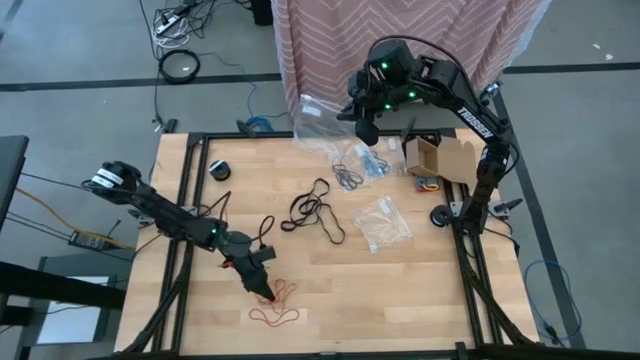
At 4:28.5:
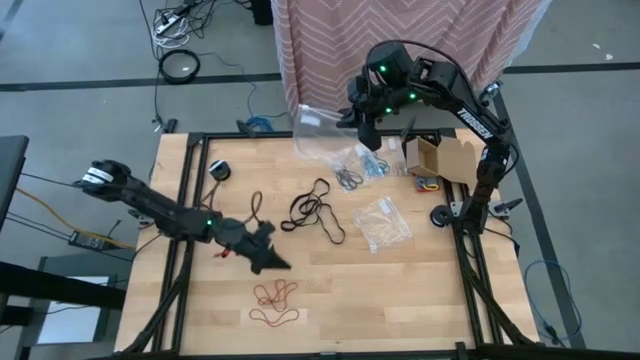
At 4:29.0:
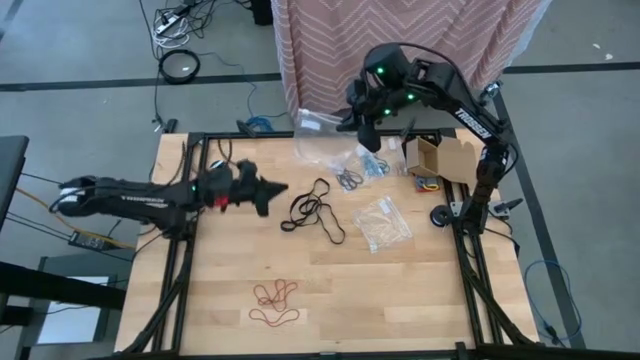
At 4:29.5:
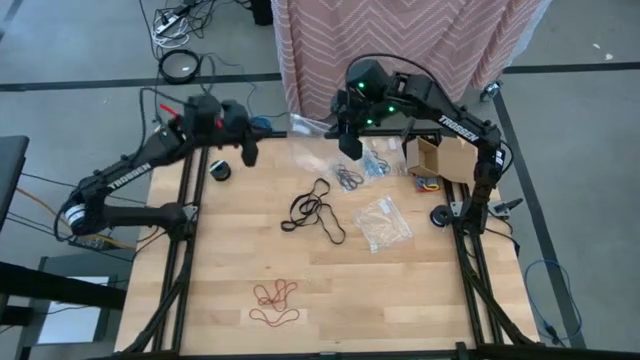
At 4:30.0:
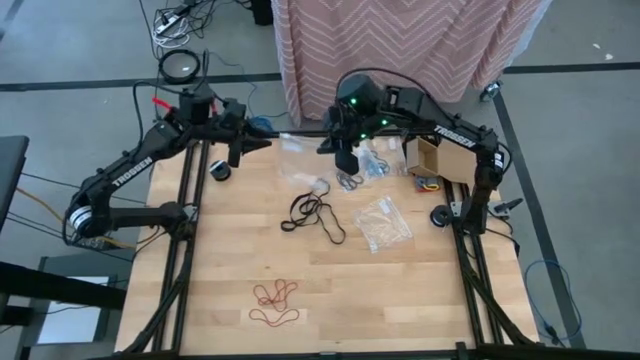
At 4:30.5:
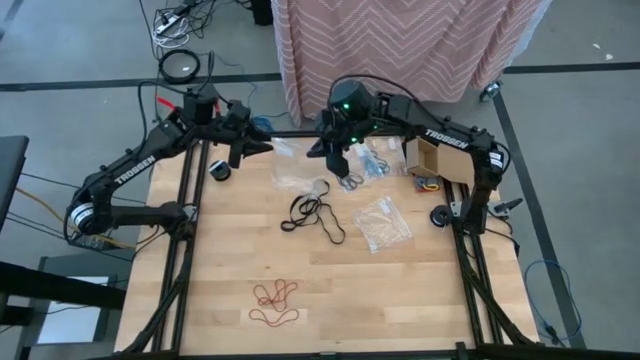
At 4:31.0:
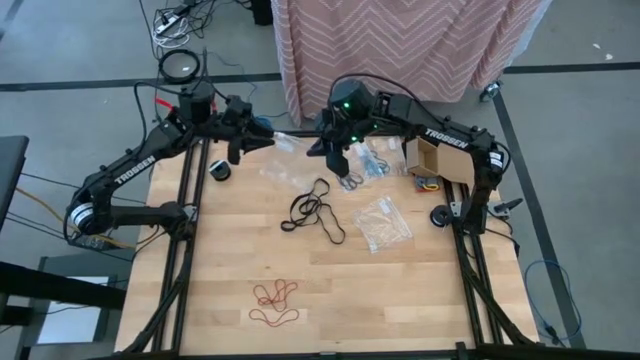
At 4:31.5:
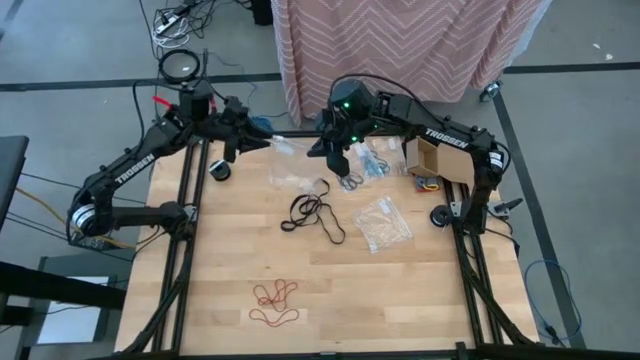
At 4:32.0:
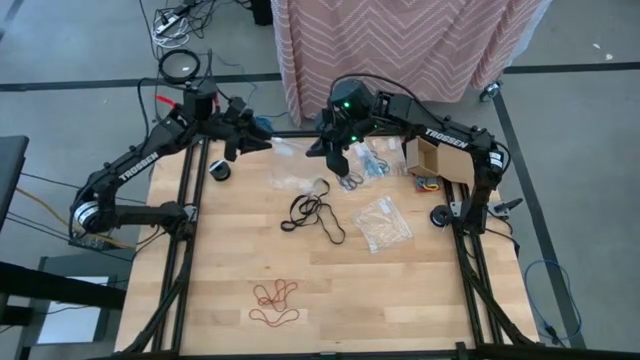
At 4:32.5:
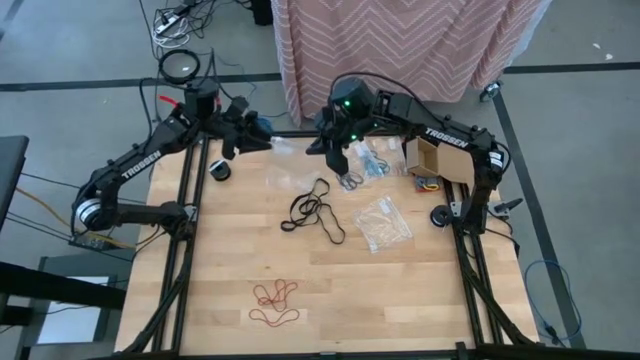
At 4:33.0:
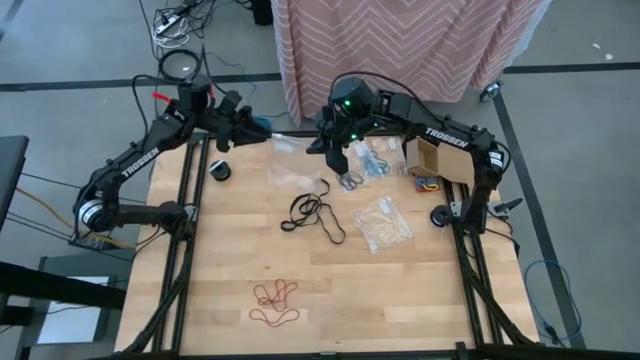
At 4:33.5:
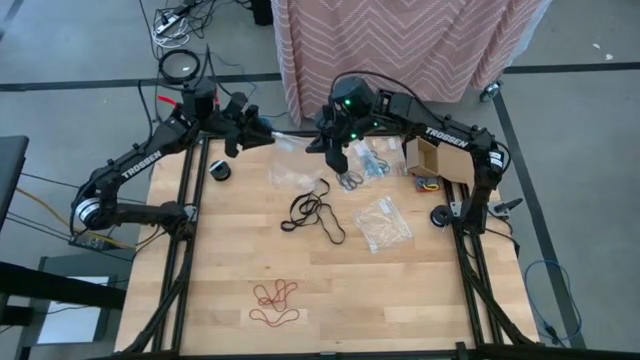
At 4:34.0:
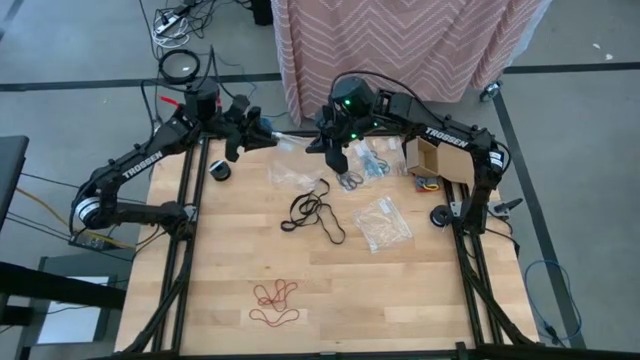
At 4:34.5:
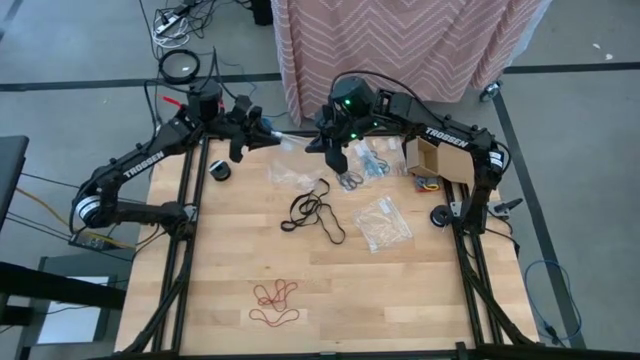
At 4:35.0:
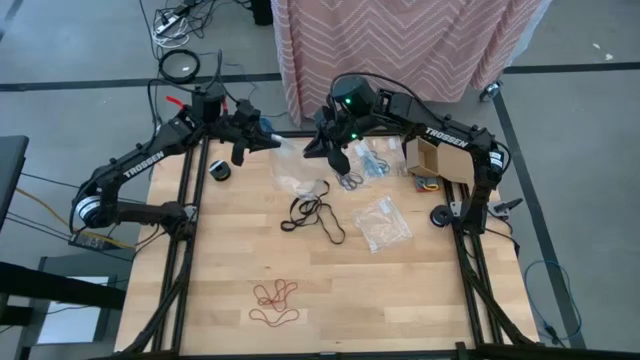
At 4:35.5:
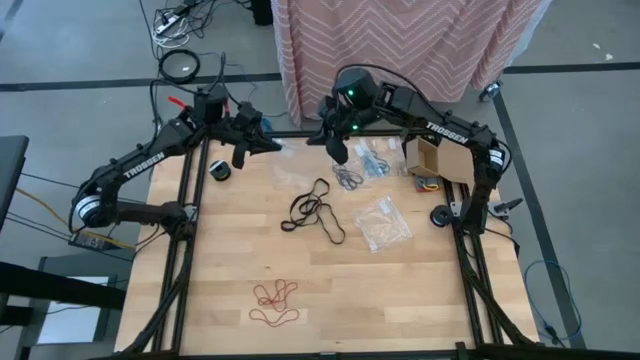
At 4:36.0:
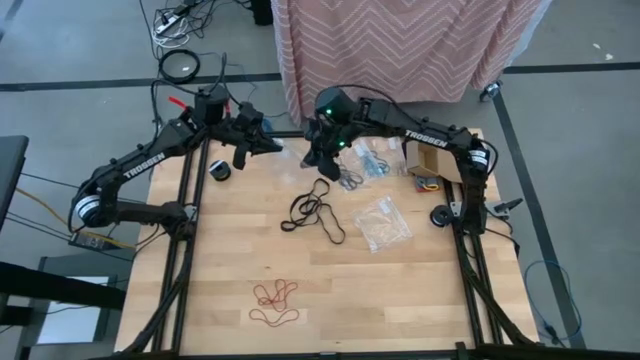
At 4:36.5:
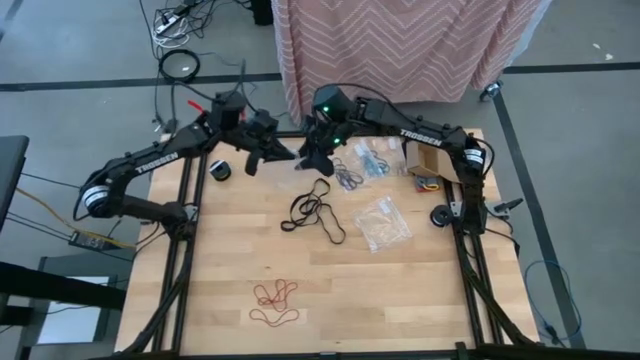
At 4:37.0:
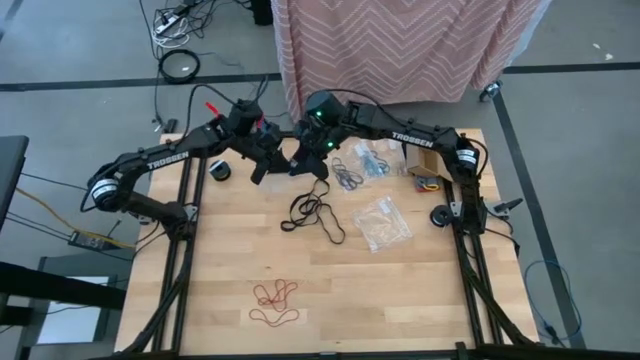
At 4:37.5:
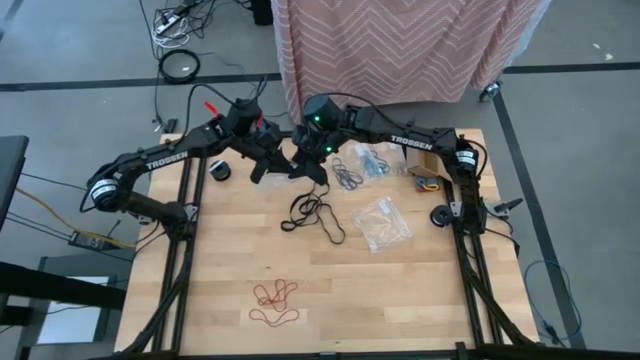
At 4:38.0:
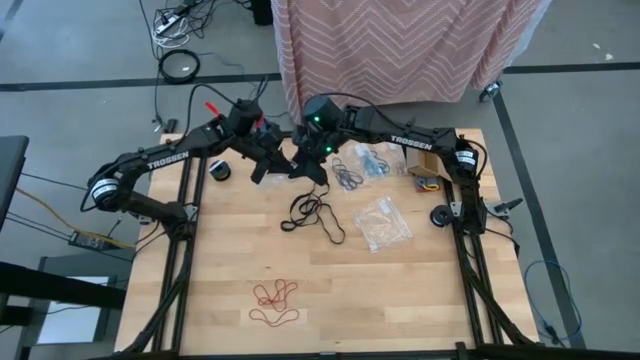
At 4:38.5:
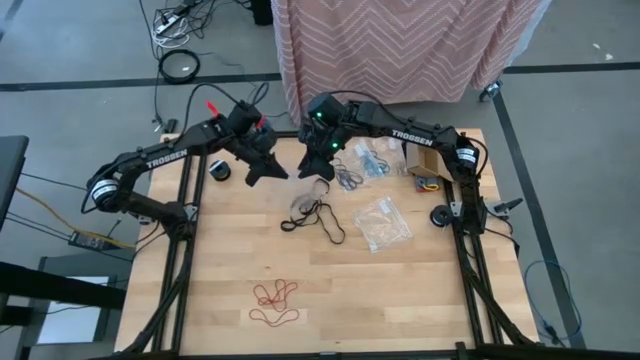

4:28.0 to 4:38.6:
Task: Sort rubber bands
Open the left transparent zip bag

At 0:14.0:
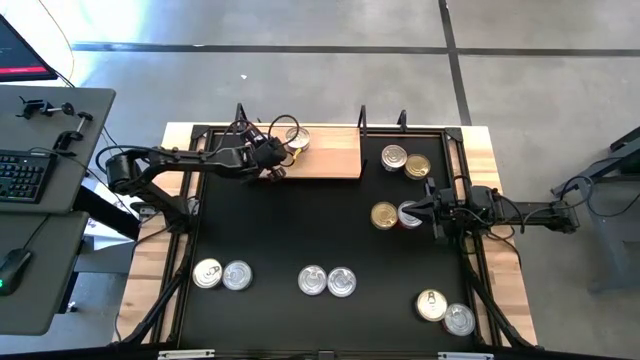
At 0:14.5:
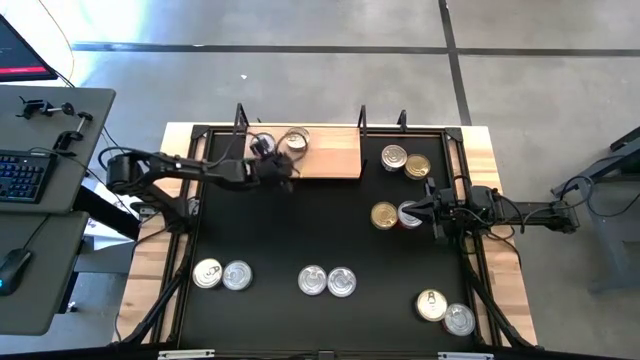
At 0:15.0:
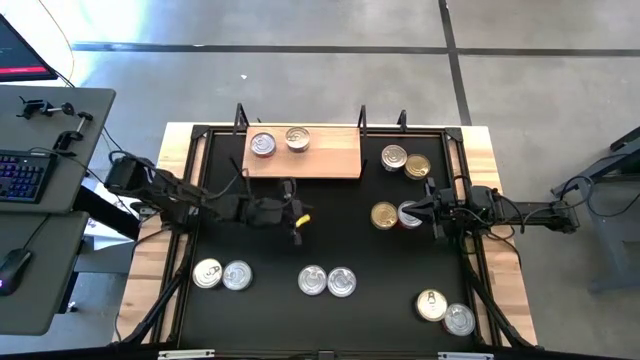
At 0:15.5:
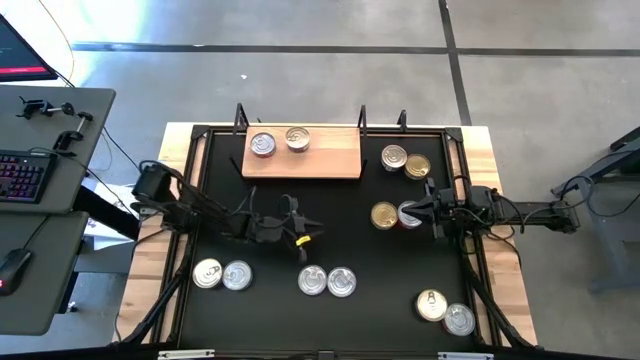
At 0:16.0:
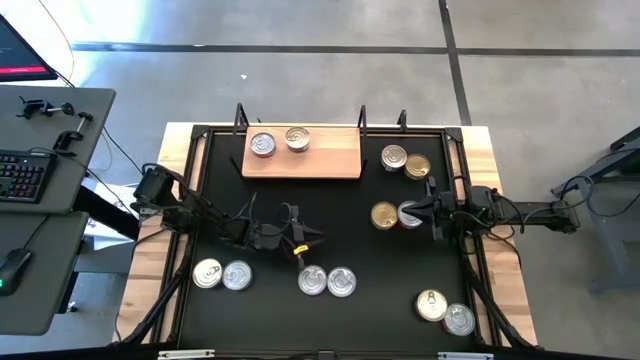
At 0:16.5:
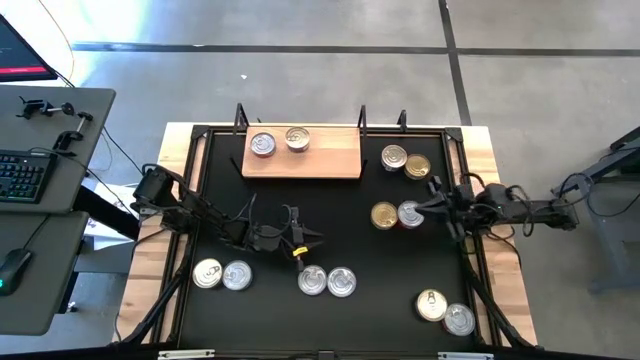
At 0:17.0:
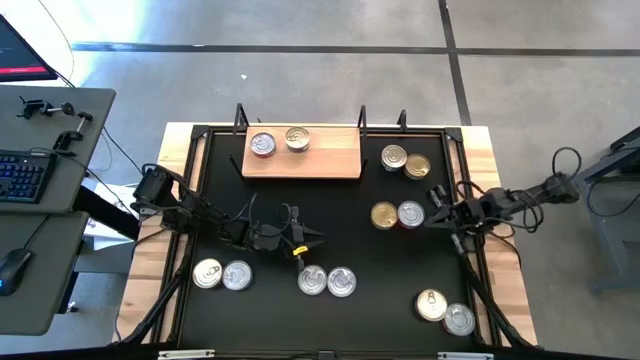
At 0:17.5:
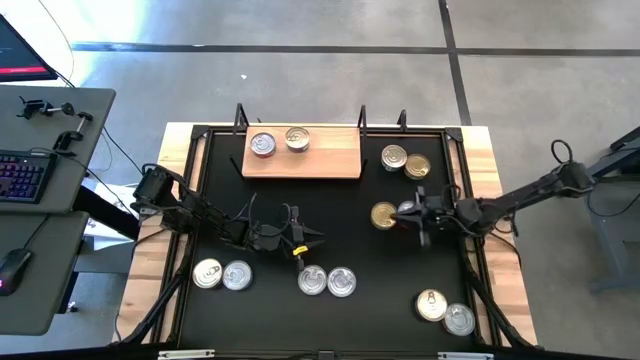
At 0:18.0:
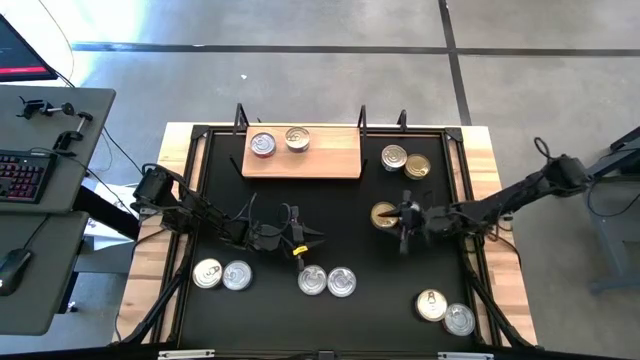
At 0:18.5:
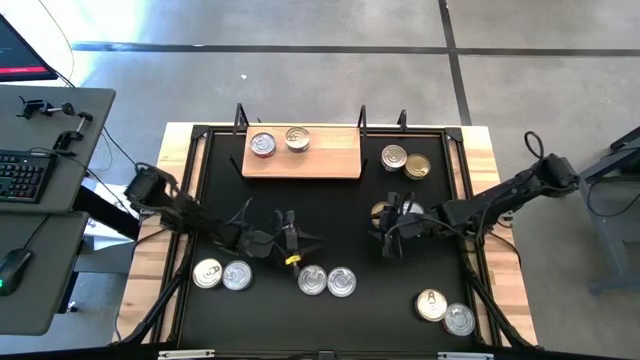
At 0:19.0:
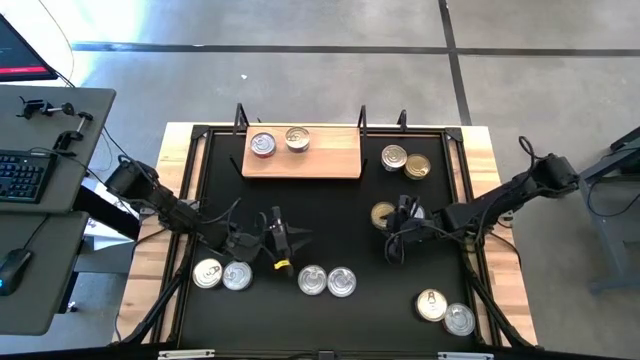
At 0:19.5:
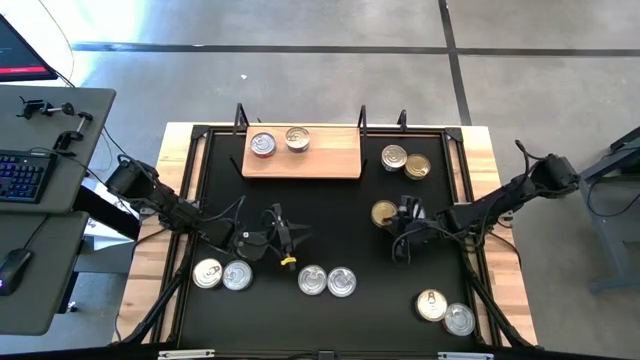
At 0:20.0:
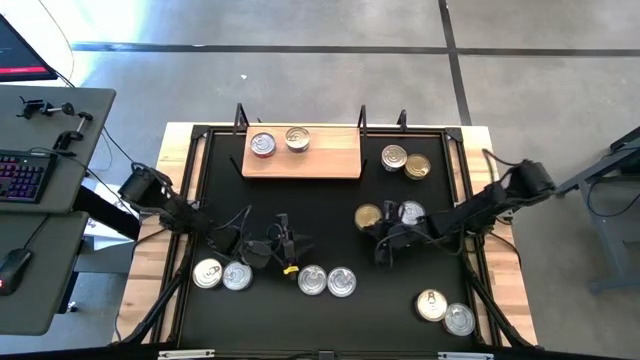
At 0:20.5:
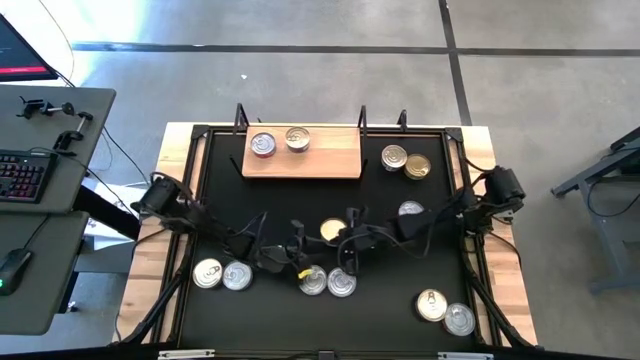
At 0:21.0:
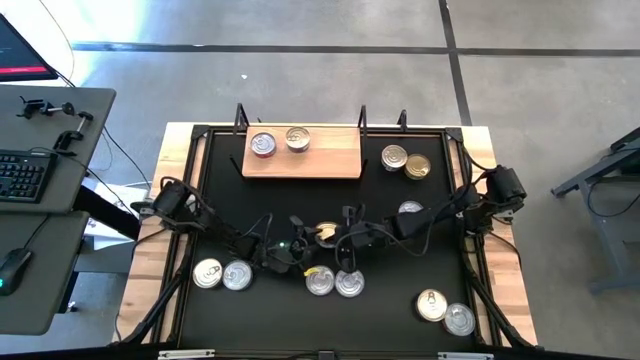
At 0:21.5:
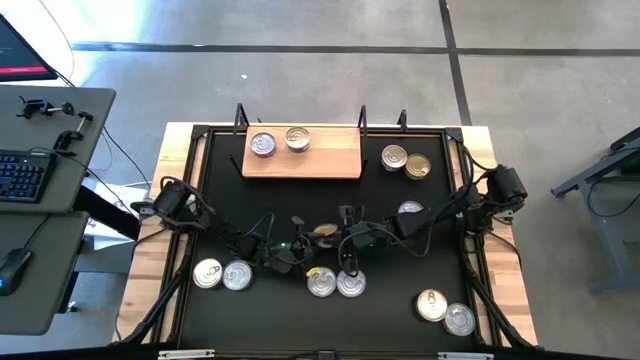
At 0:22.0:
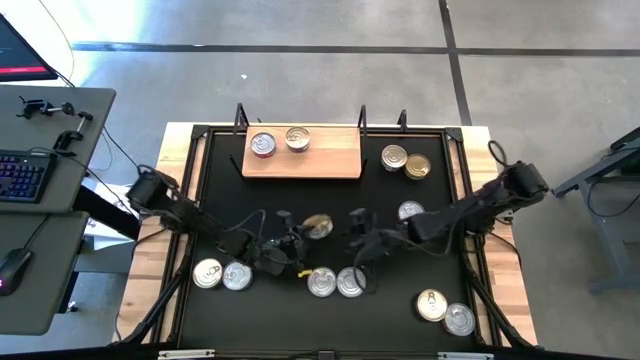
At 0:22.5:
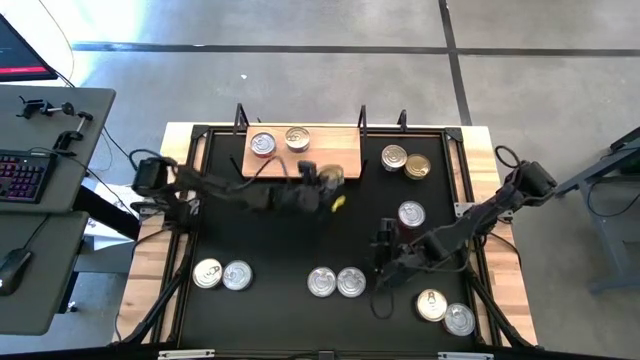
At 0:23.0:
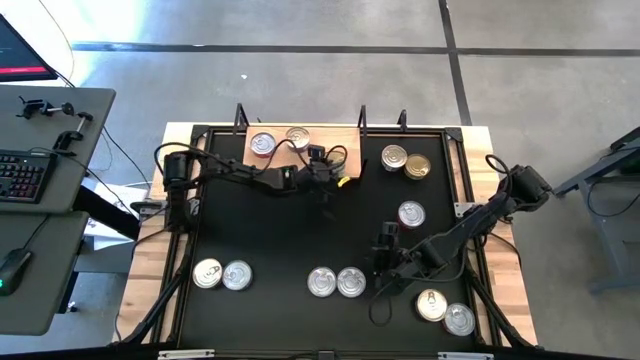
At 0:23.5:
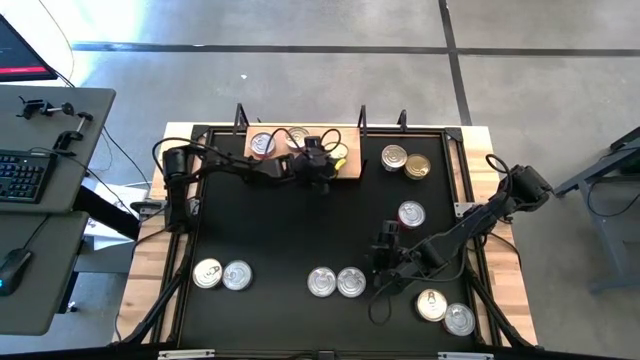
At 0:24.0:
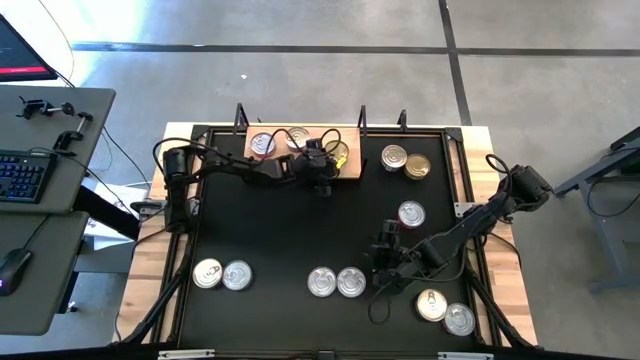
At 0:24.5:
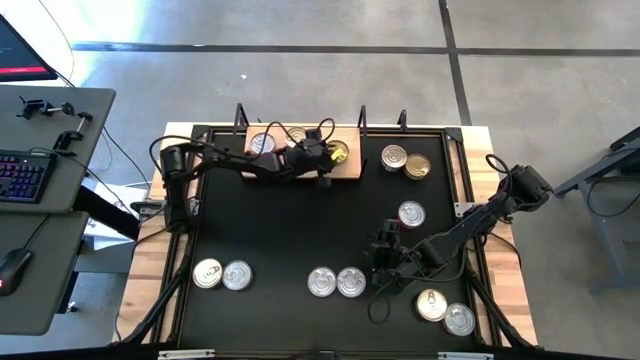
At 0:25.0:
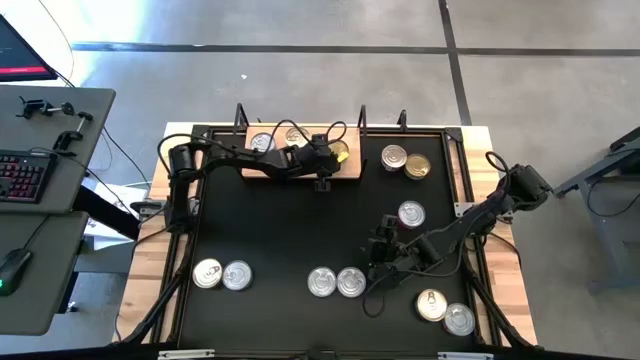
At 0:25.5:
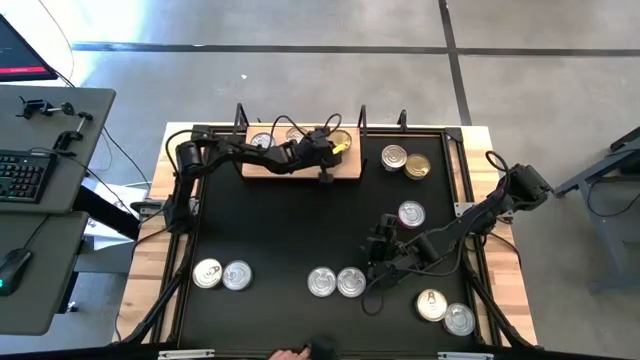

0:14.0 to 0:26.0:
Task: Stack canned seafood by type on shelf
Put the green tuna can on the shelf
